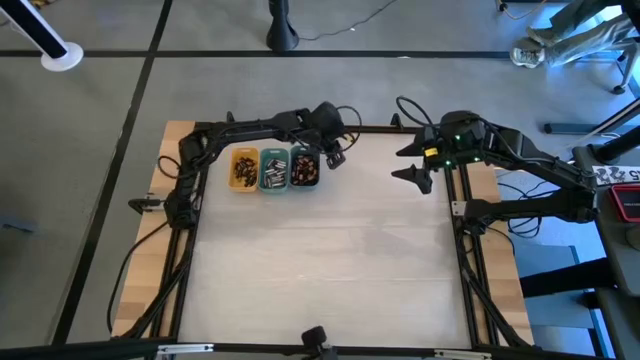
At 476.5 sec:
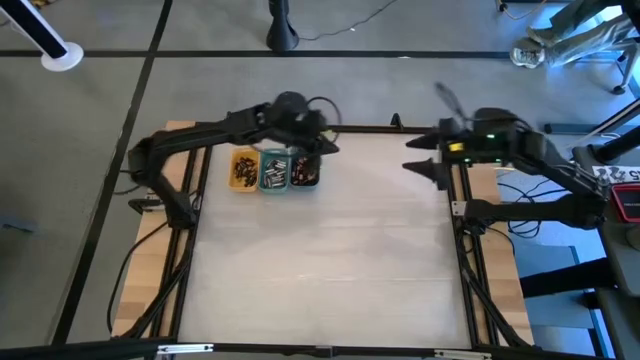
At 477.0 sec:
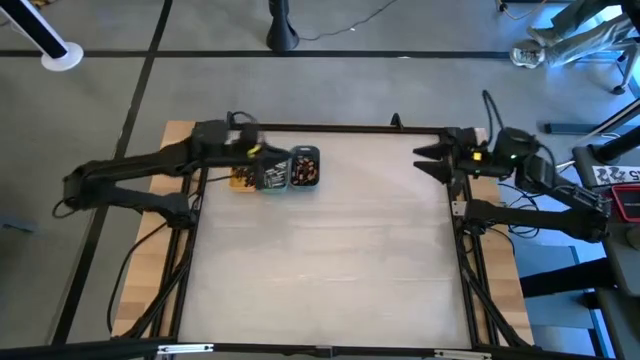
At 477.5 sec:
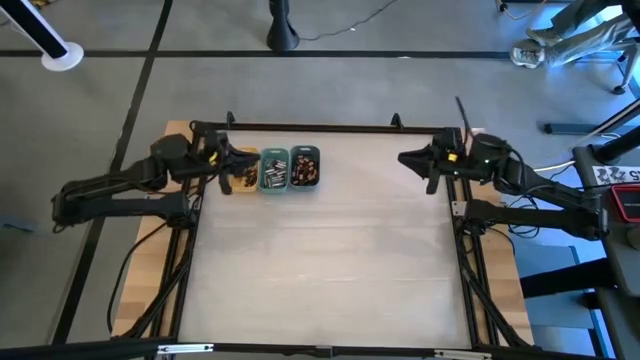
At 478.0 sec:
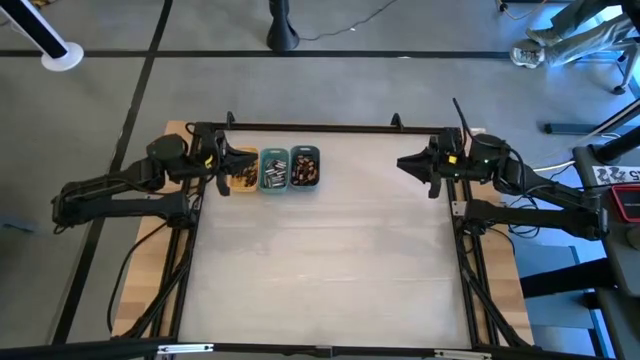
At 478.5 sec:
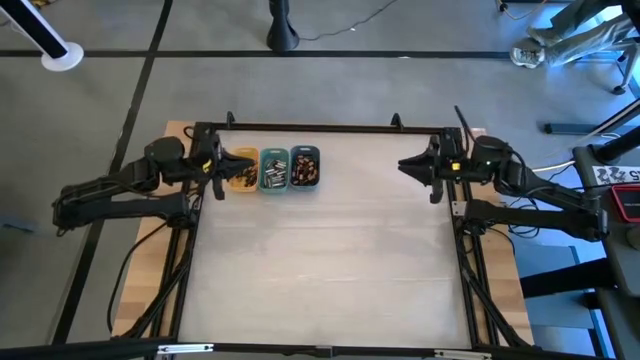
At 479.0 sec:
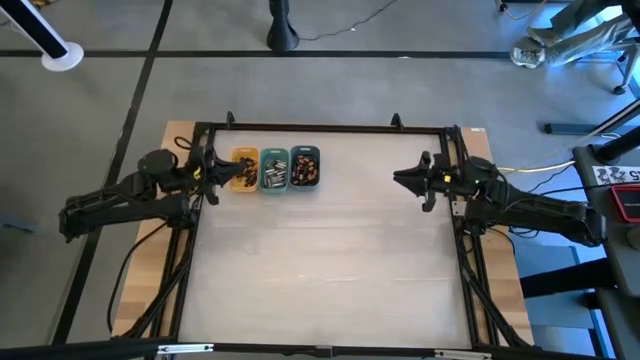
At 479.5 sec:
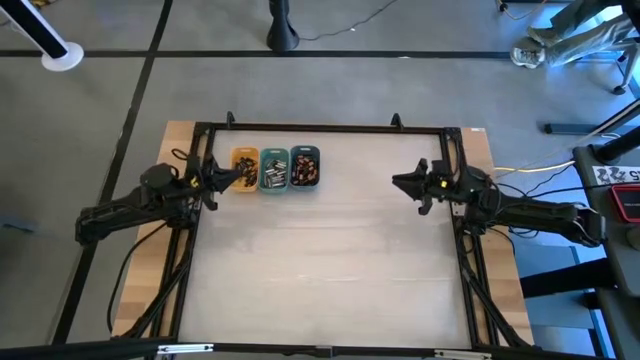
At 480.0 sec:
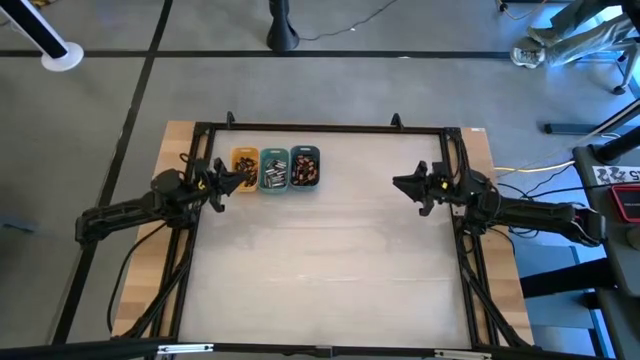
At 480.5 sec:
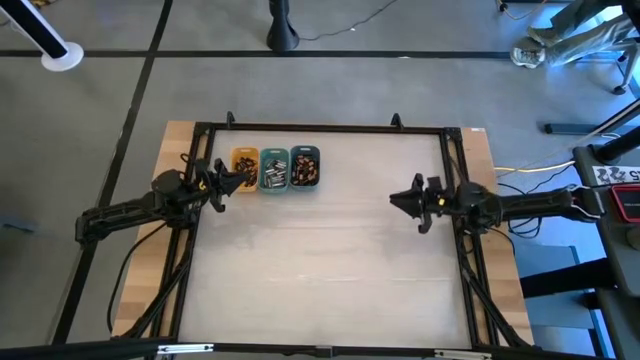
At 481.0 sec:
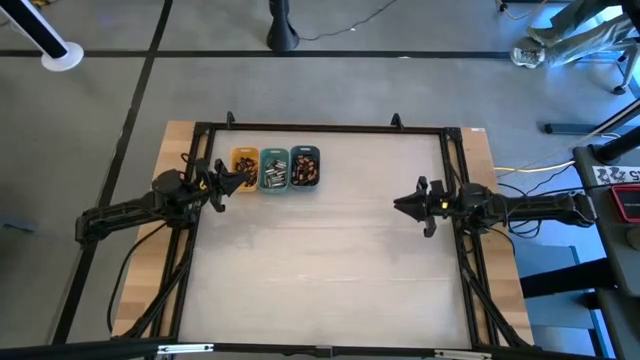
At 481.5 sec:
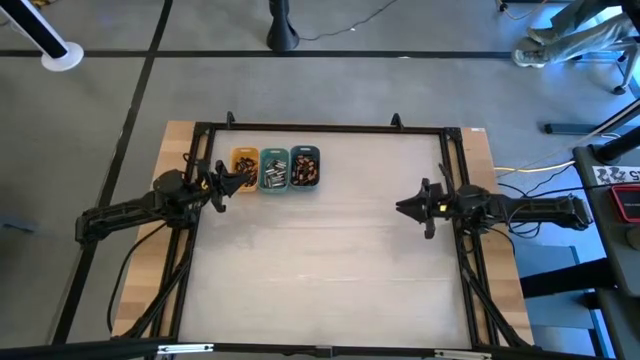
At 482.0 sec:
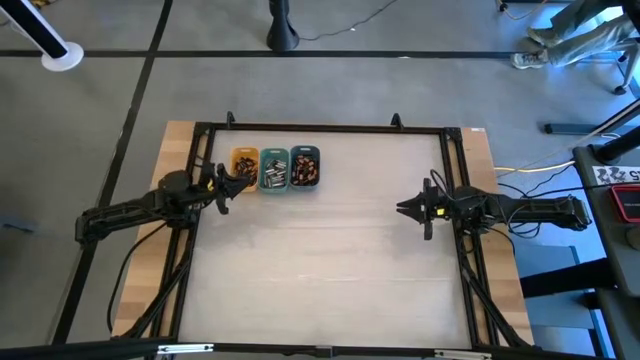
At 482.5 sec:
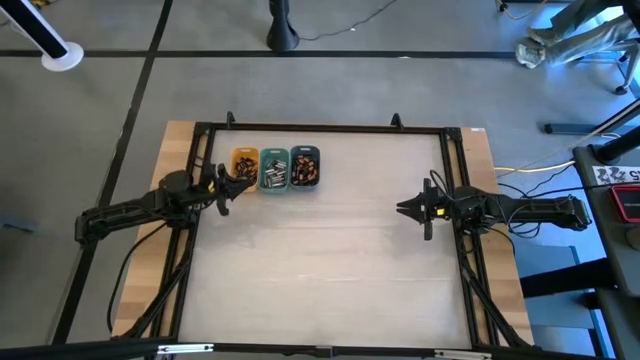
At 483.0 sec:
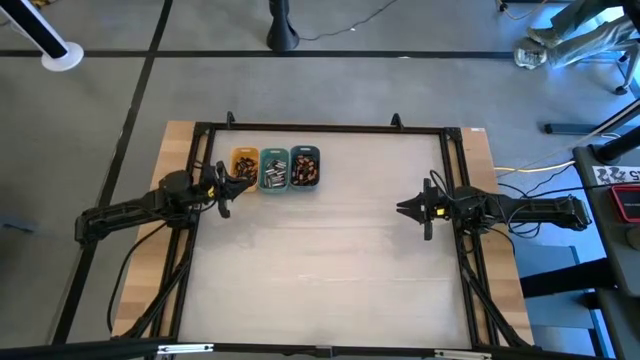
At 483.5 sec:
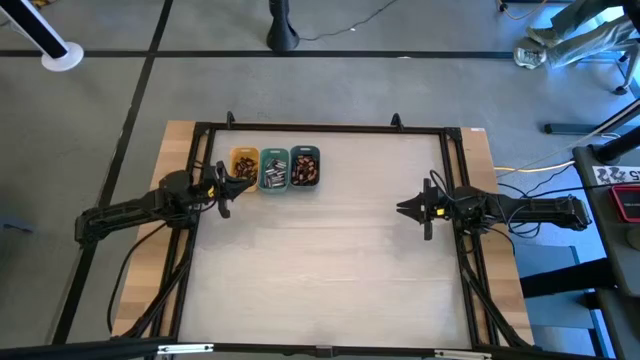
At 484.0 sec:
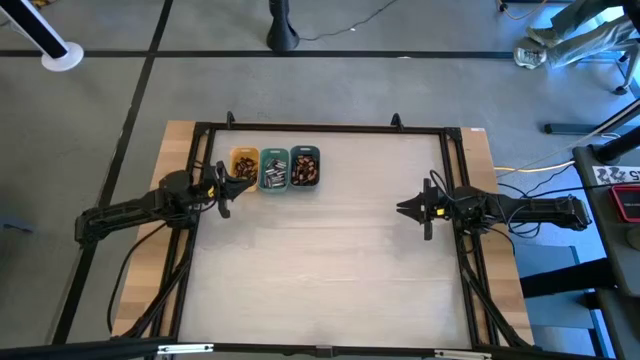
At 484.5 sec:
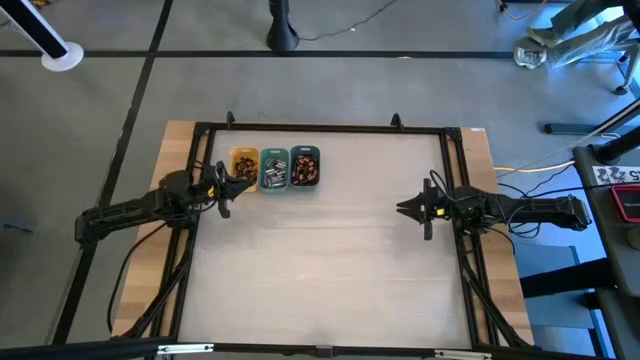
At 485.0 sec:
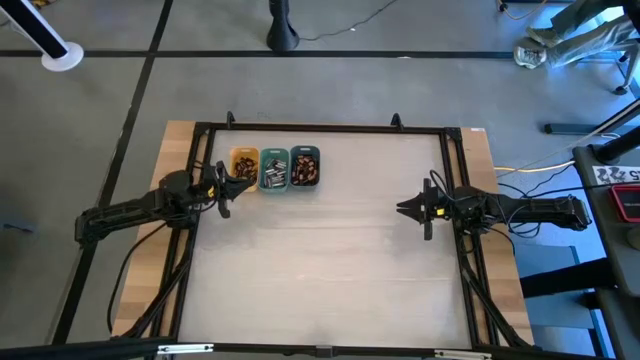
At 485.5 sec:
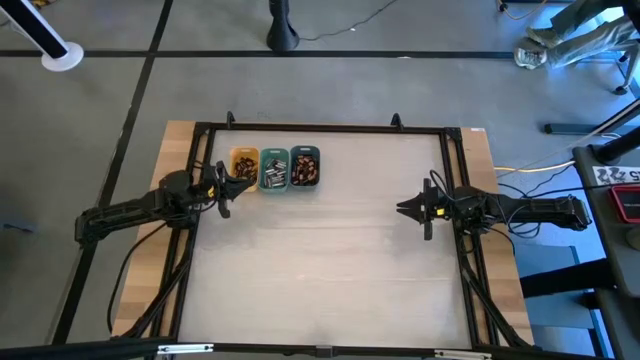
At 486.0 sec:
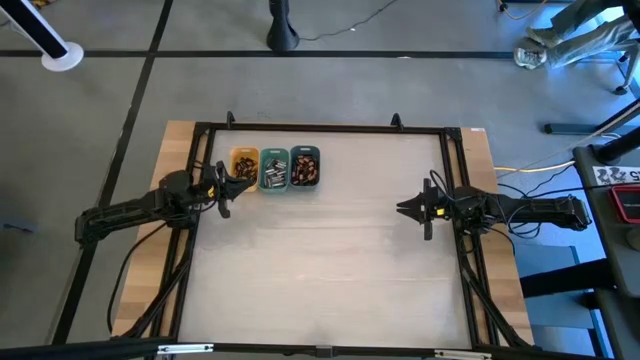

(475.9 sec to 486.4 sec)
Task: Sort batteries
Return to Home Position

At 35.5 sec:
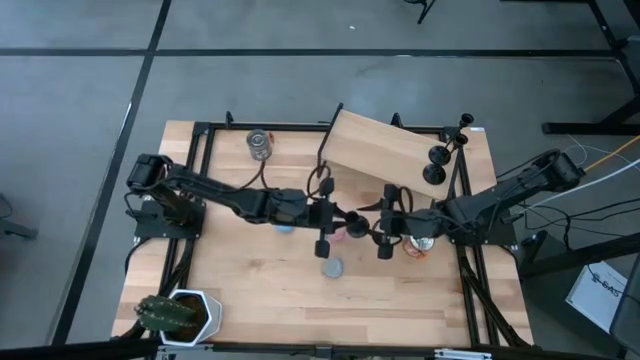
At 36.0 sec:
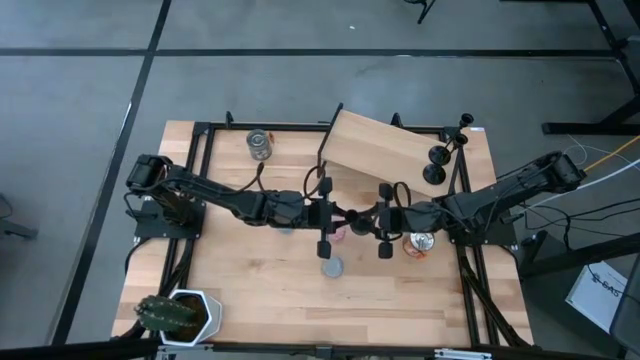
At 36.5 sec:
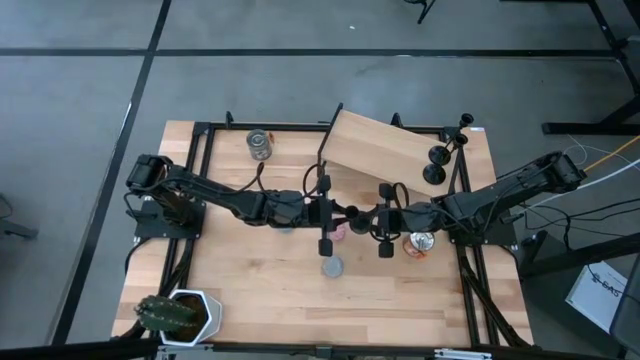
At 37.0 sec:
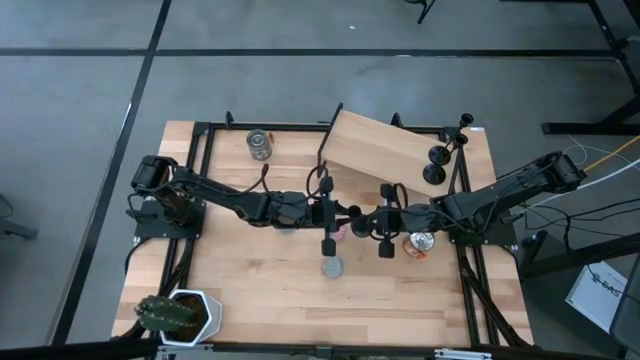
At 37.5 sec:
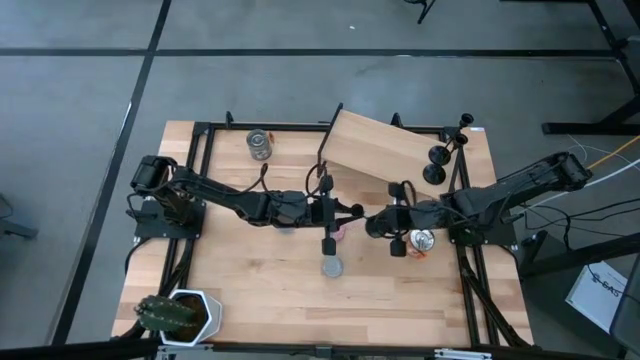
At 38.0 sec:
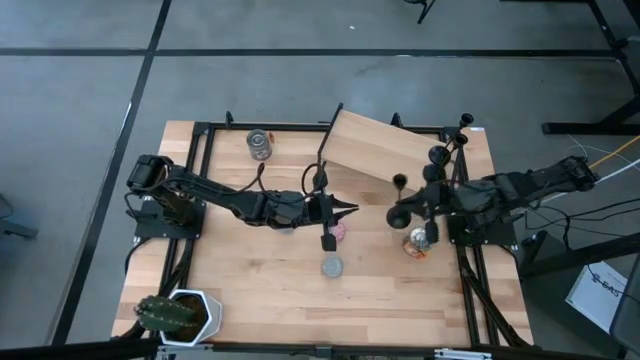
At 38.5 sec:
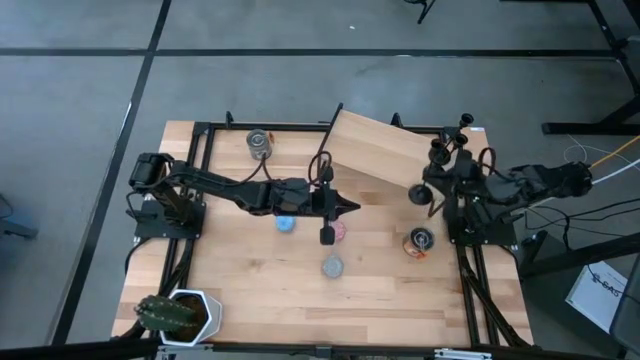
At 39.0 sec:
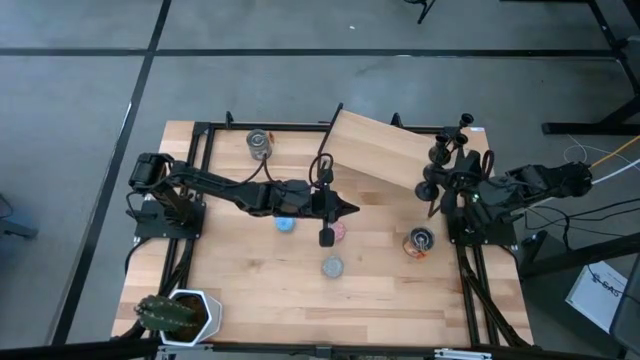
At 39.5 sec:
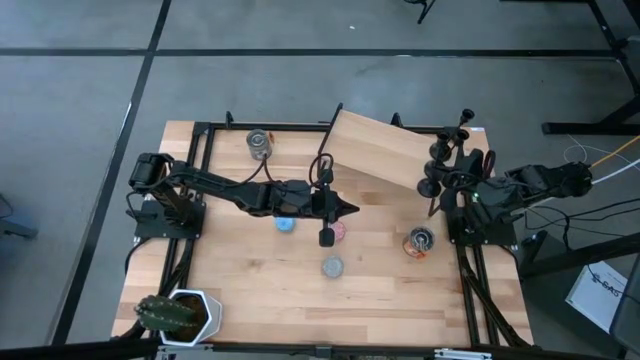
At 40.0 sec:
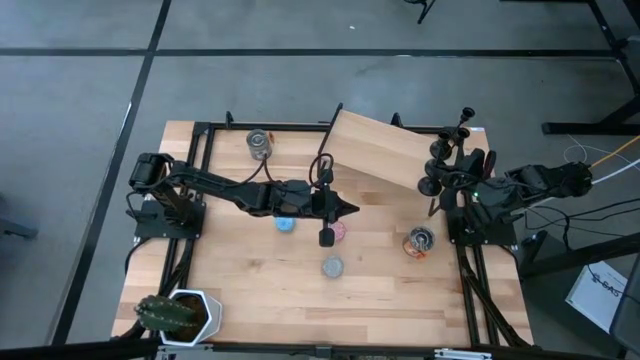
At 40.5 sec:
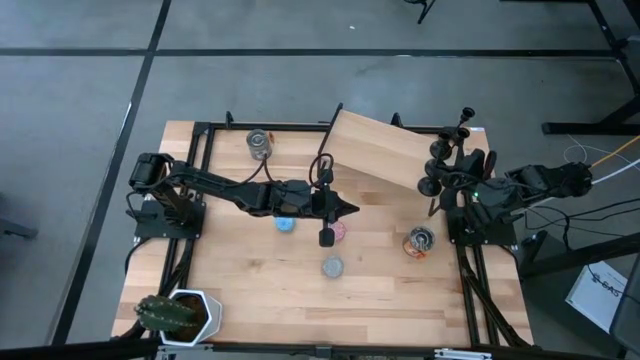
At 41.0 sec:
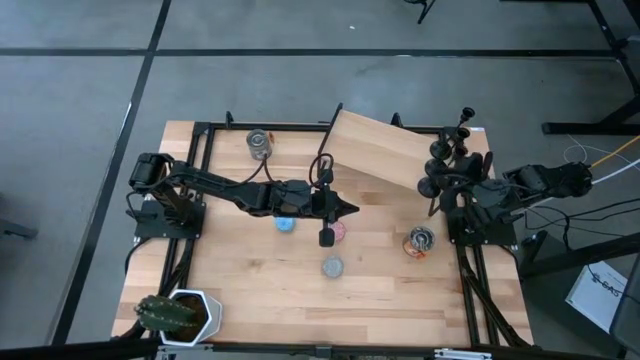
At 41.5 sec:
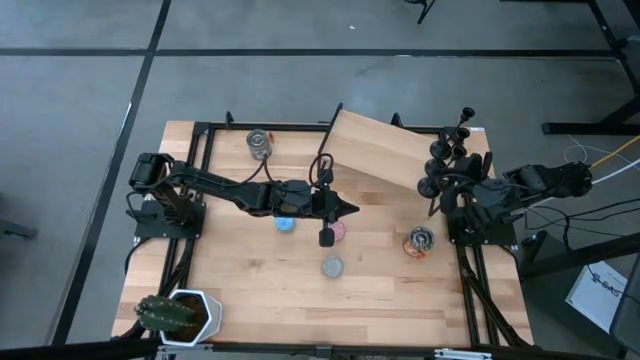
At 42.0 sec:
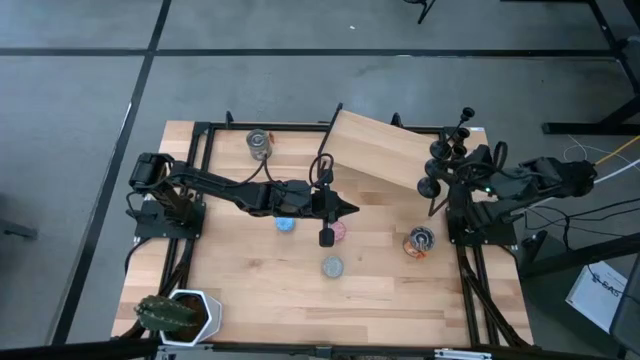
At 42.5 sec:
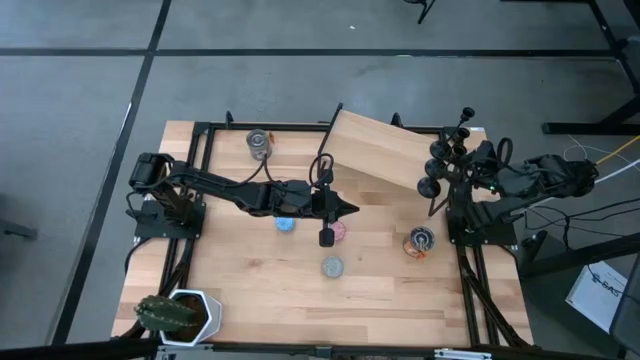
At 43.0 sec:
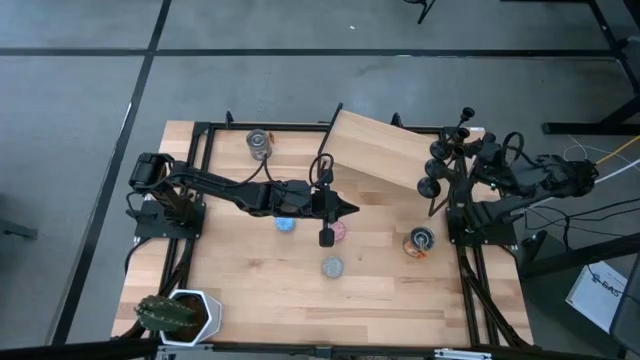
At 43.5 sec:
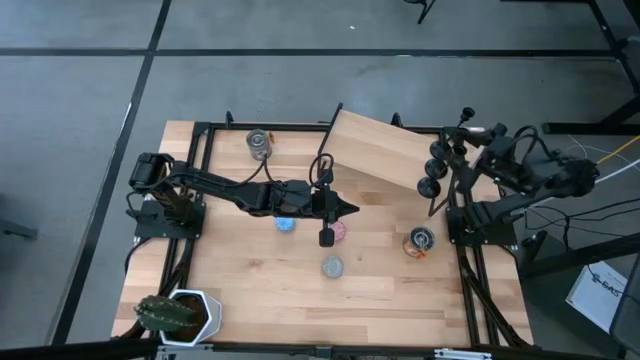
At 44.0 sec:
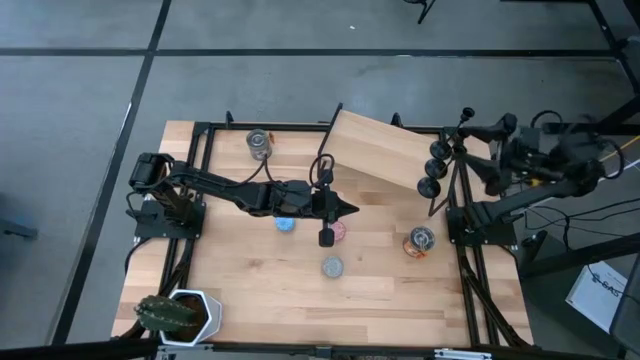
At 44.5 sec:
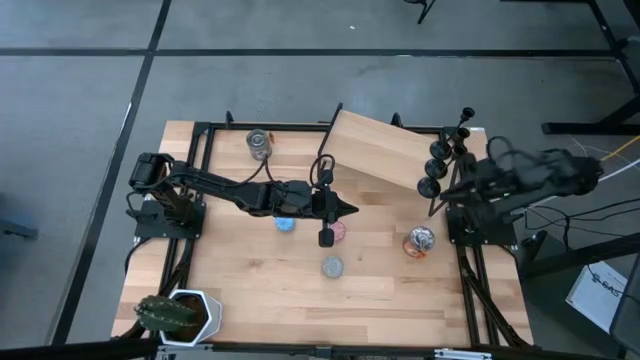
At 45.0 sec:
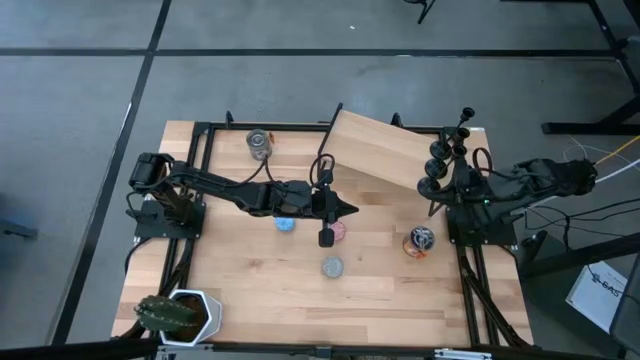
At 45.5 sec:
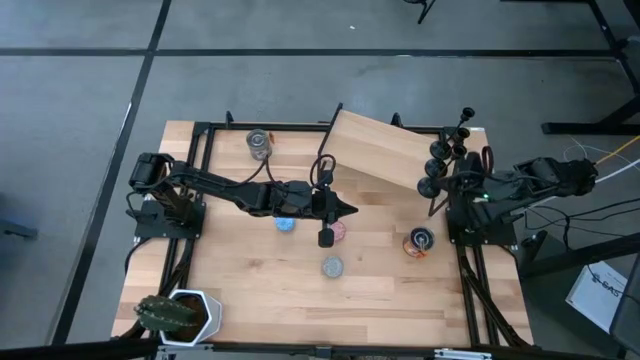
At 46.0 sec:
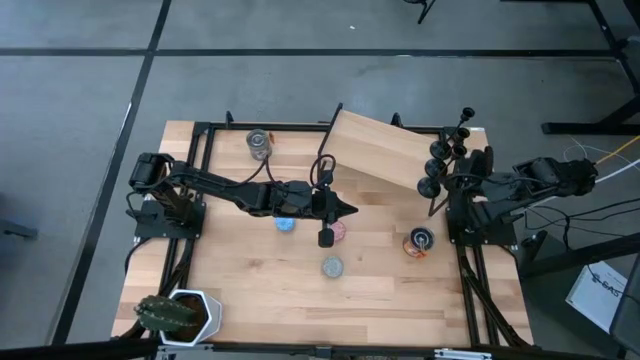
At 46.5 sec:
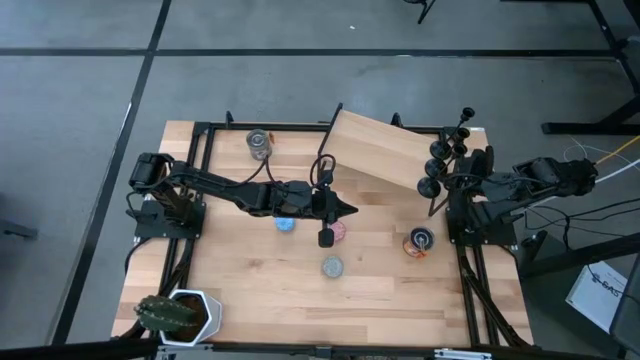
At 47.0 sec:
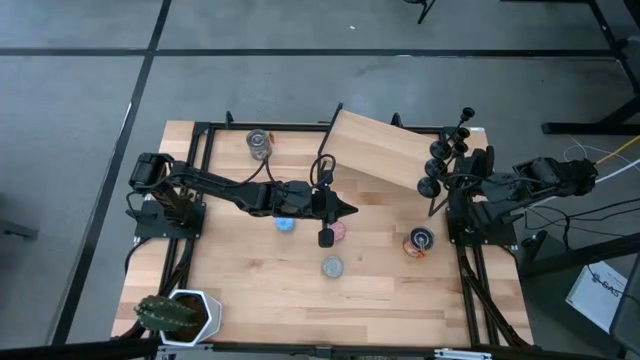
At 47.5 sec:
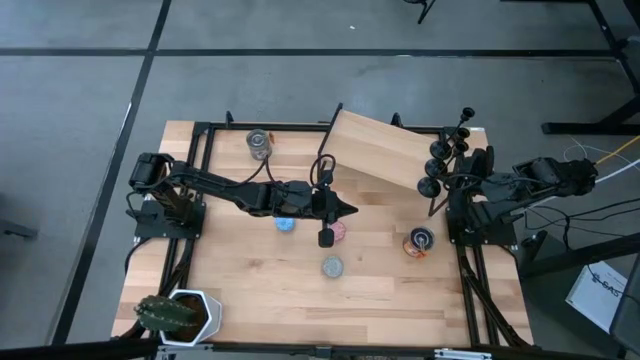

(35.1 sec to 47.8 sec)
Task: Pick & Place candle stick holders
Align the black candle holder with the other black candle holder on the shelf
